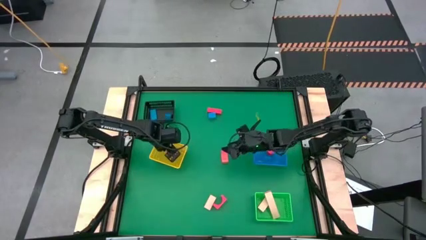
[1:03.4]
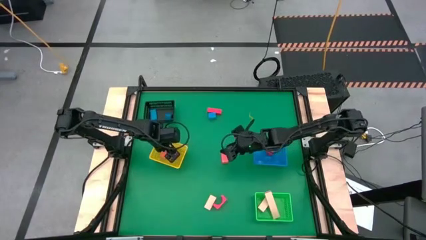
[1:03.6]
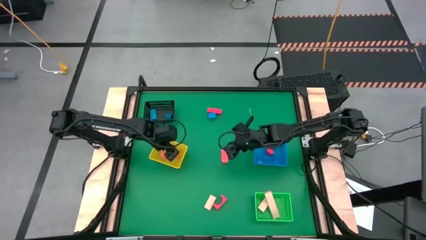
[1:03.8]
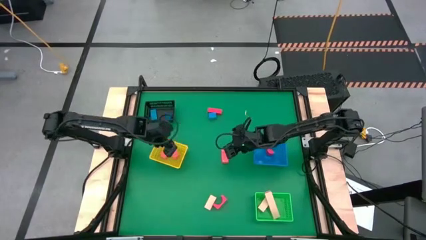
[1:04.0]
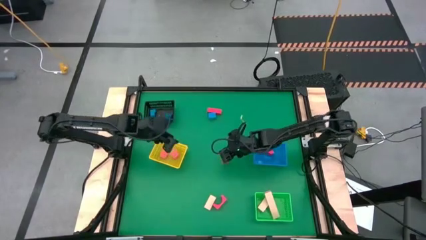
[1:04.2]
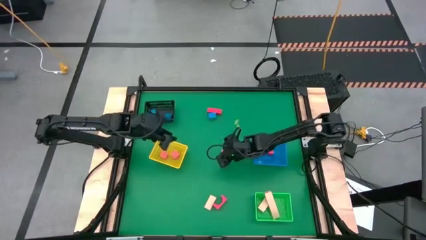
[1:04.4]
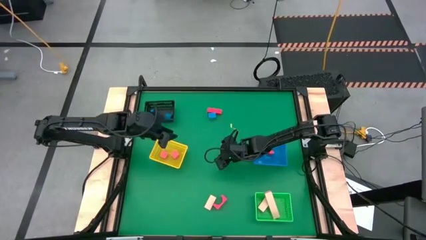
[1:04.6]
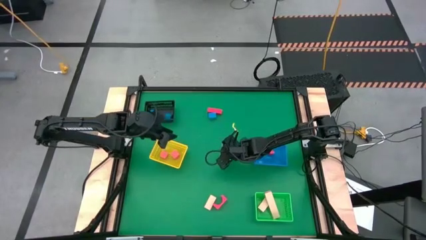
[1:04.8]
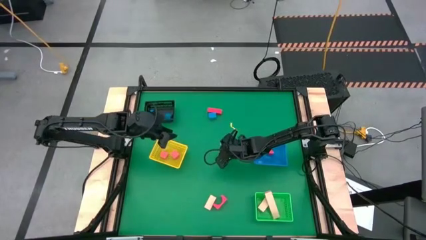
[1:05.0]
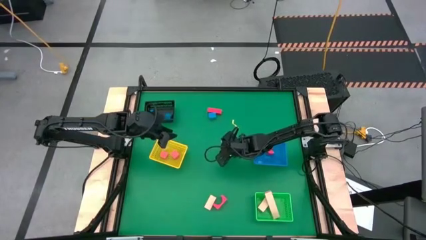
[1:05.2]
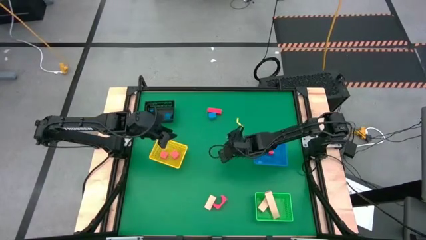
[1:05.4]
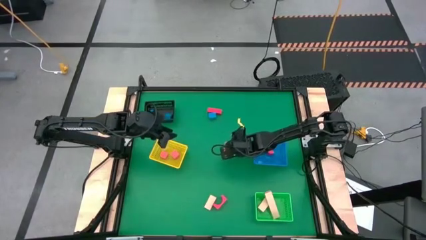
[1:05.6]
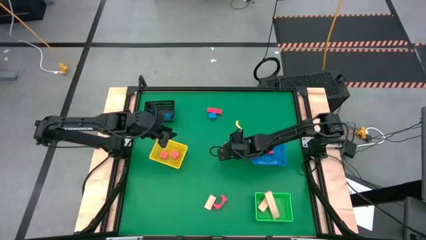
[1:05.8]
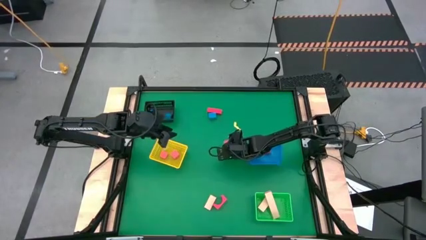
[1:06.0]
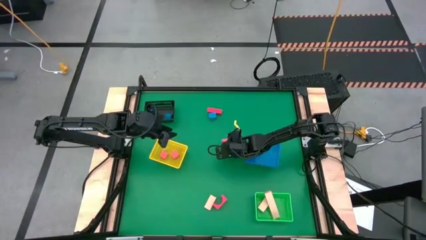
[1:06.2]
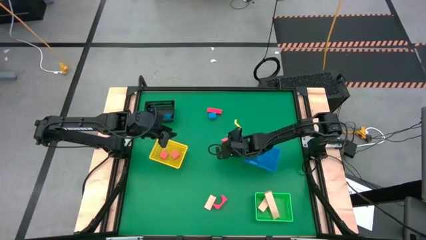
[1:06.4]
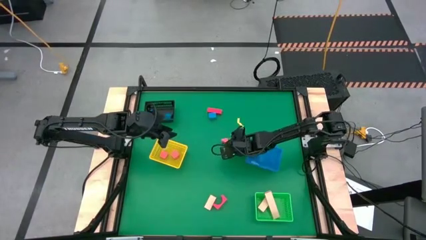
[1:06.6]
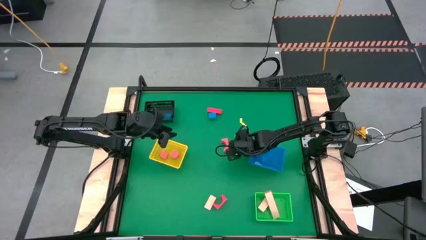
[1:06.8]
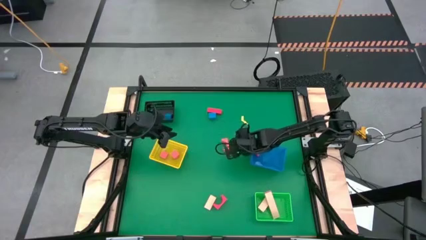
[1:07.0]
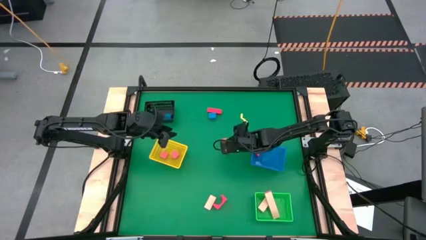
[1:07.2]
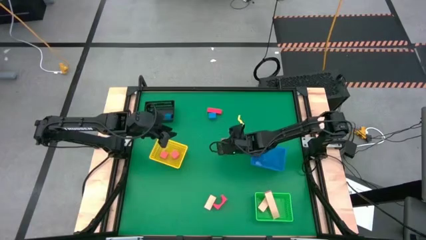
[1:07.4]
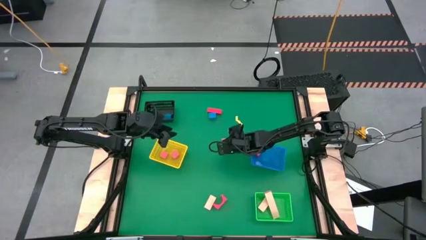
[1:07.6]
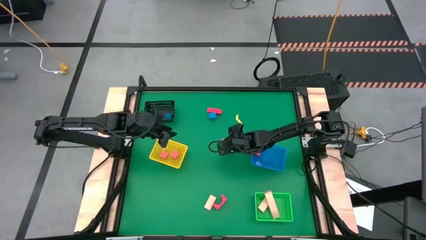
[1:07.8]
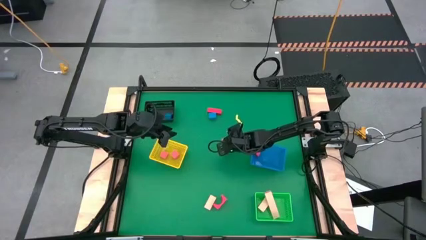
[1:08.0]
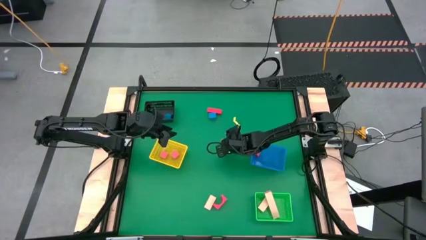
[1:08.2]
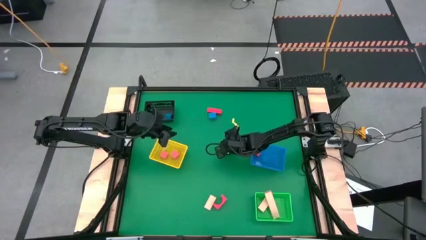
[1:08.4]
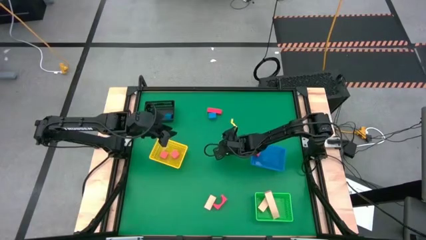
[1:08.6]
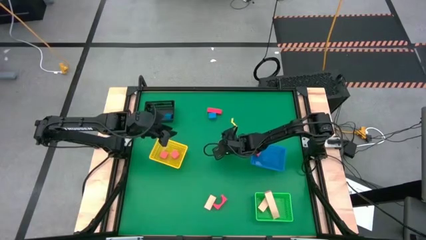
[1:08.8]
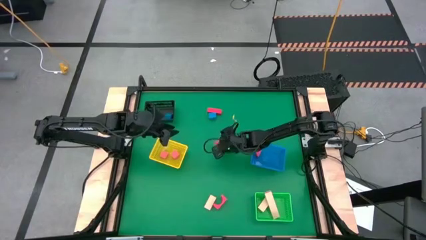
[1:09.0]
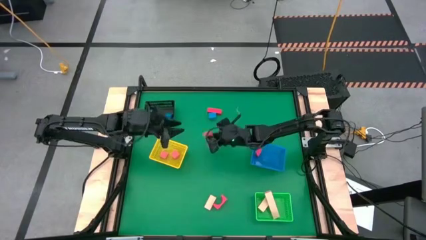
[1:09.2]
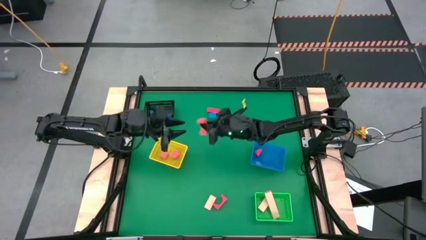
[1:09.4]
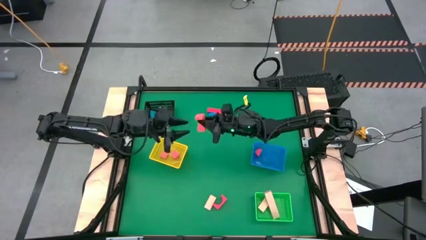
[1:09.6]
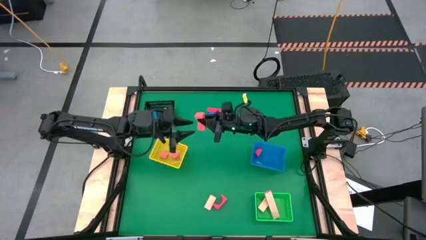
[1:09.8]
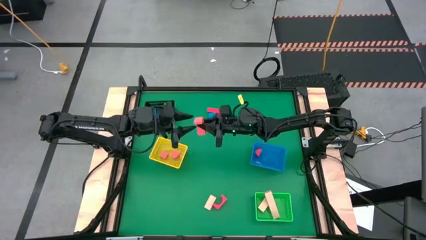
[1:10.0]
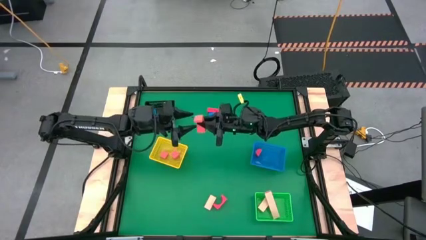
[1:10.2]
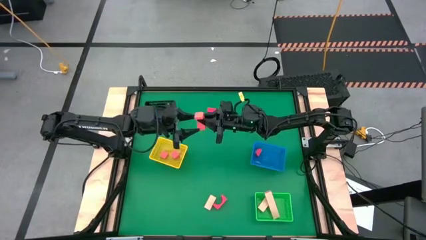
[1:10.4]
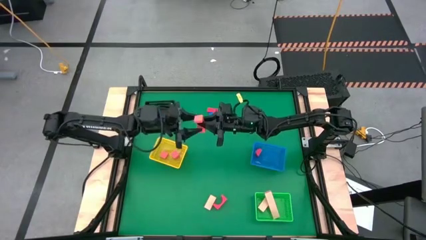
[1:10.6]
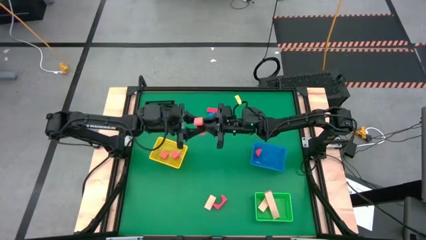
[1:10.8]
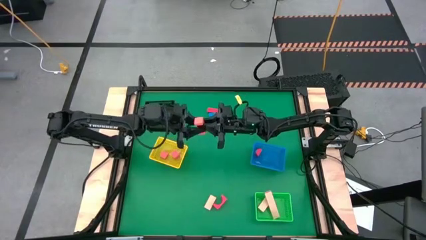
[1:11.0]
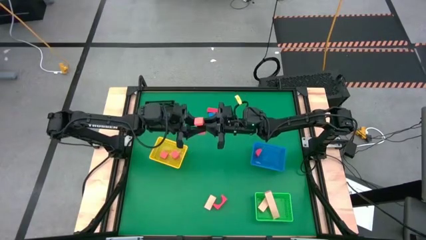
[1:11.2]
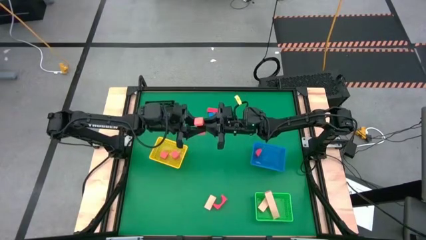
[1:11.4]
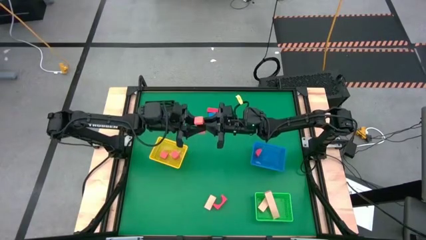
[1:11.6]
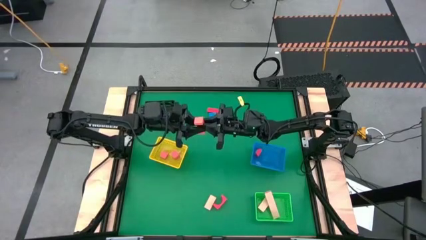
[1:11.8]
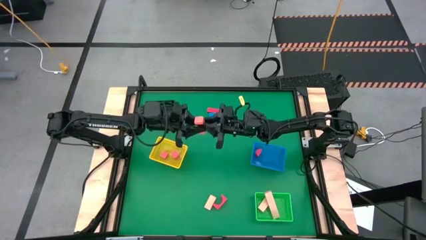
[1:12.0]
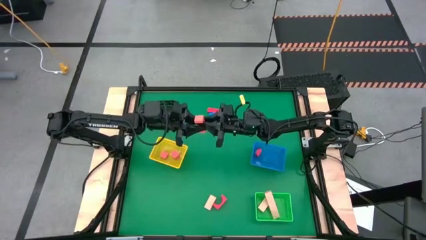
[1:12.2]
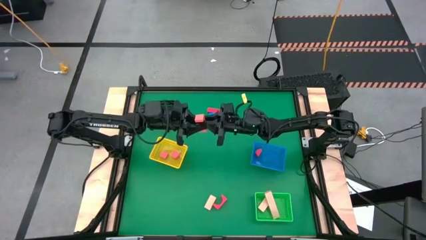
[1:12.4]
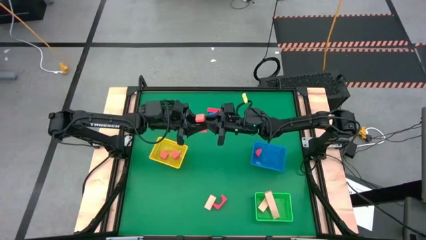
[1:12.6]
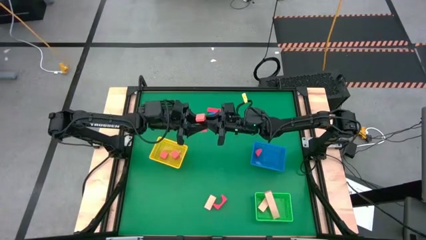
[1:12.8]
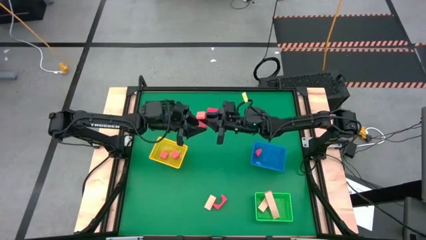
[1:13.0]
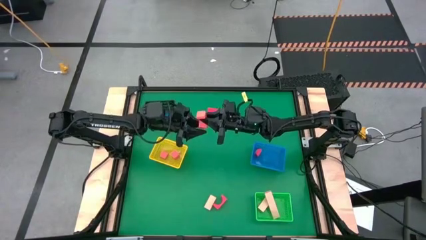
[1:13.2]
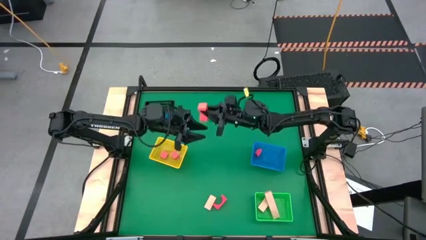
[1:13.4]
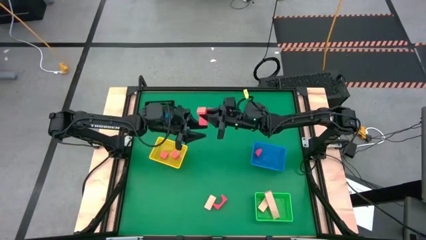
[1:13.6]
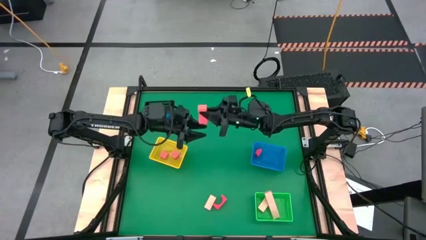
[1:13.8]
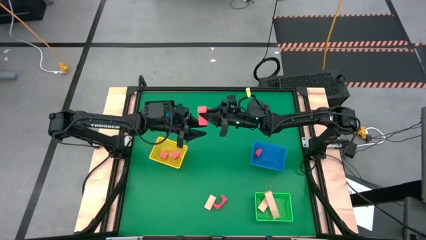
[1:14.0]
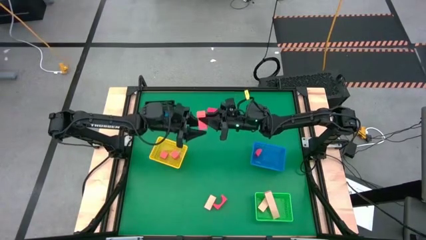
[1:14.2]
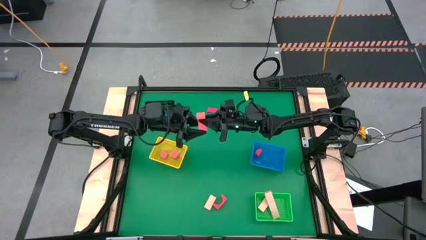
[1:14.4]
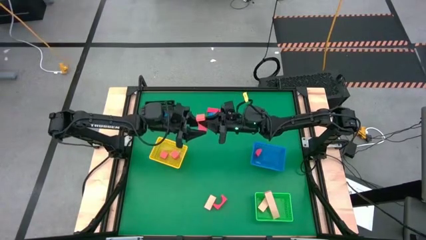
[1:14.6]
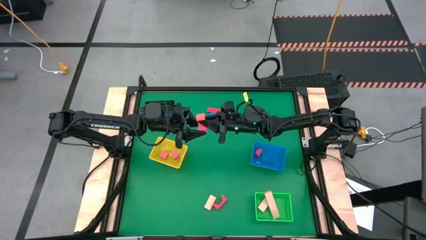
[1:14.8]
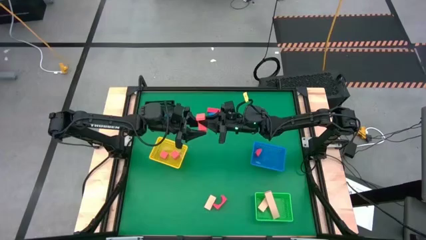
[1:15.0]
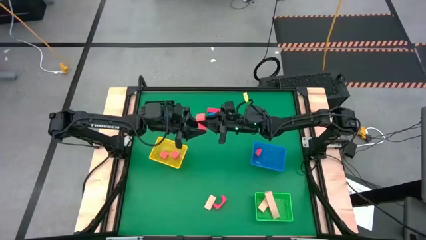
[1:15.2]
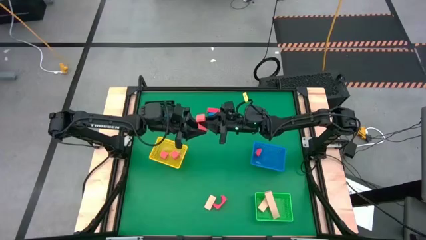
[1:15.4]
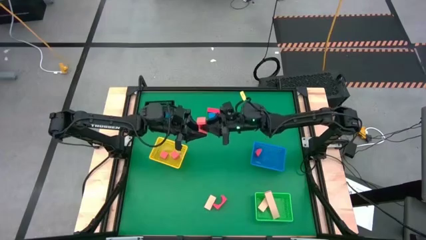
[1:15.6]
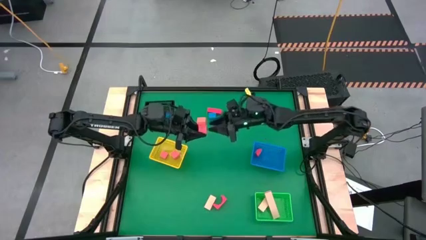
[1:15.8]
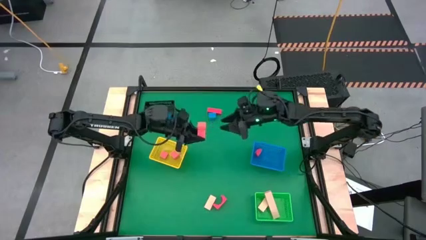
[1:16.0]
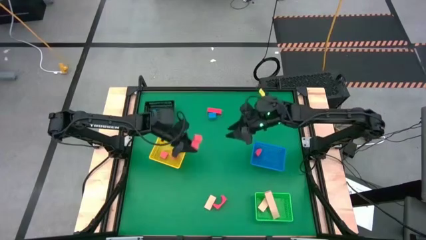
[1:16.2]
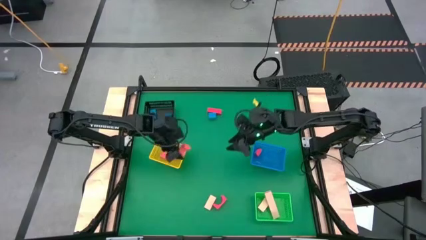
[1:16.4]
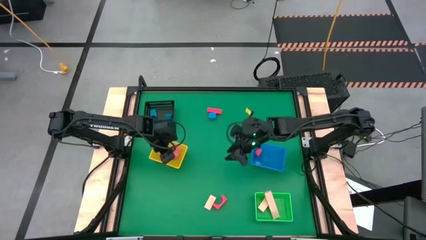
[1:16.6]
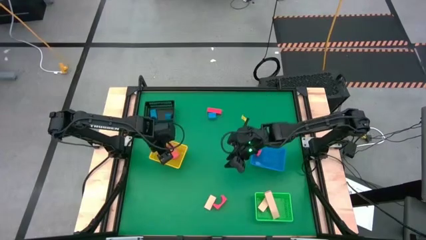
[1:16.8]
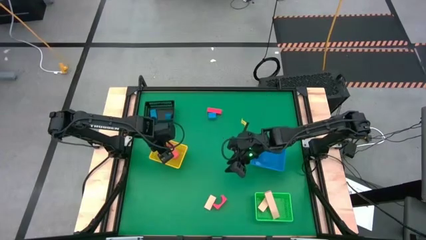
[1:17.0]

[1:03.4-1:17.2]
Task: Sort & place blocks by color
Put the pink arch block into the yellow basket

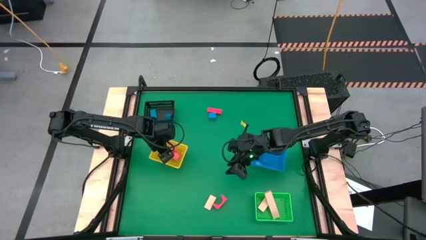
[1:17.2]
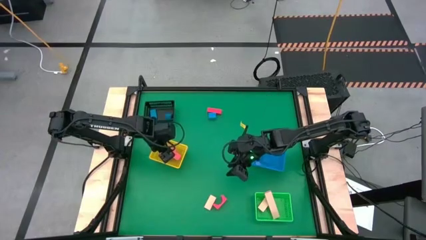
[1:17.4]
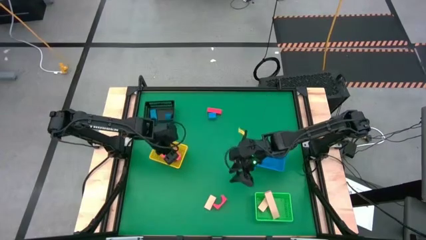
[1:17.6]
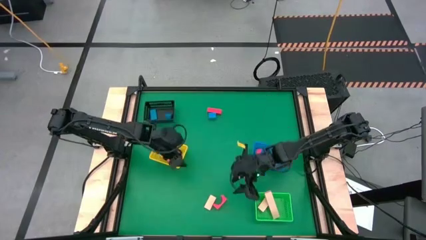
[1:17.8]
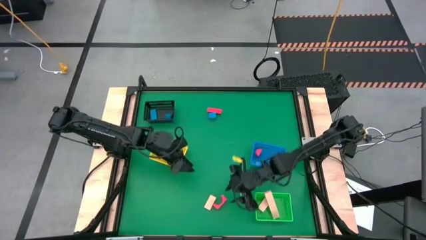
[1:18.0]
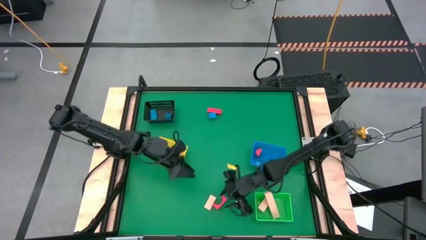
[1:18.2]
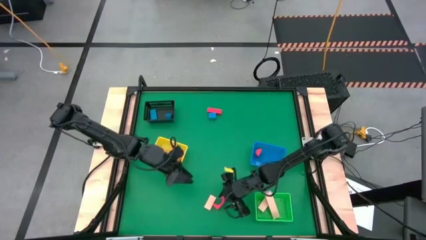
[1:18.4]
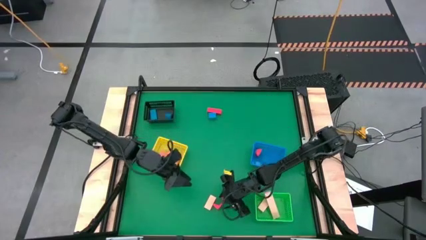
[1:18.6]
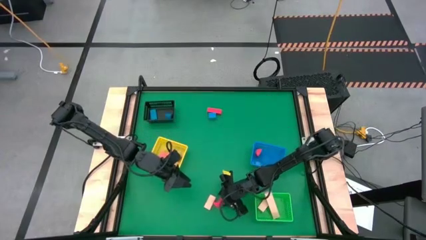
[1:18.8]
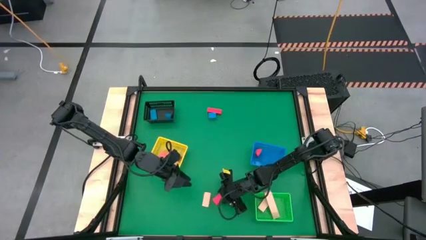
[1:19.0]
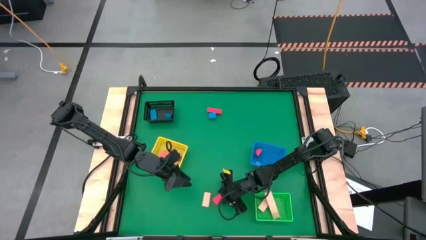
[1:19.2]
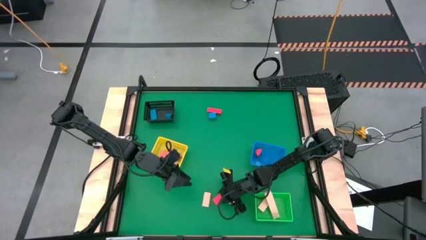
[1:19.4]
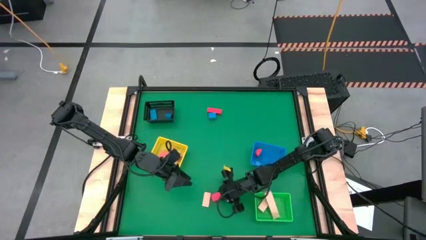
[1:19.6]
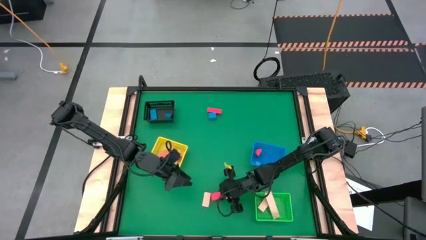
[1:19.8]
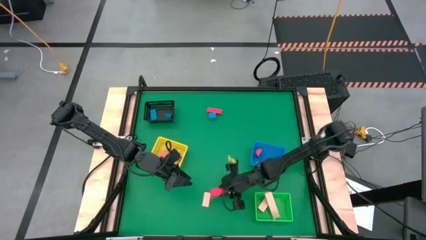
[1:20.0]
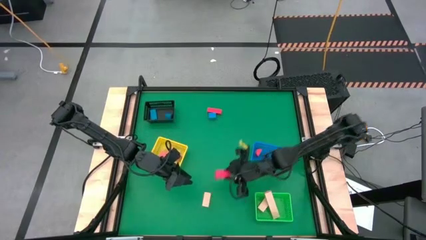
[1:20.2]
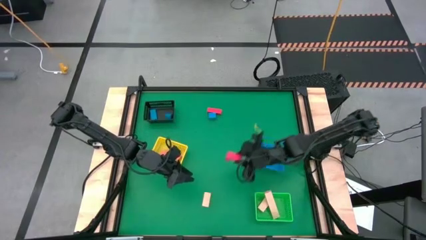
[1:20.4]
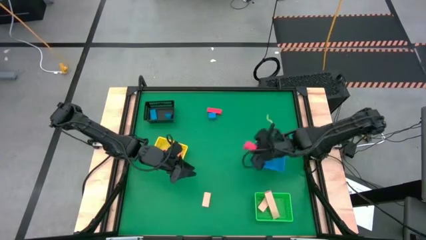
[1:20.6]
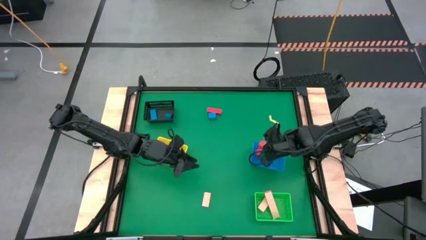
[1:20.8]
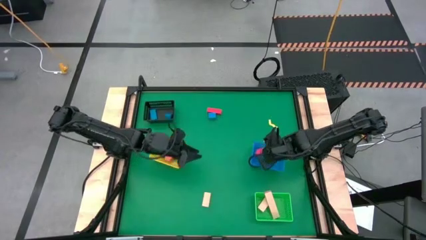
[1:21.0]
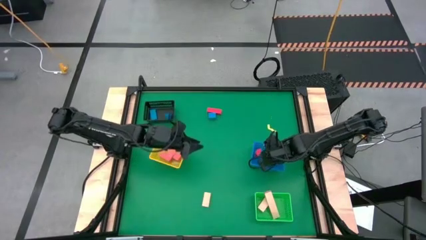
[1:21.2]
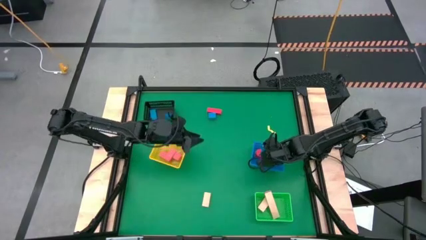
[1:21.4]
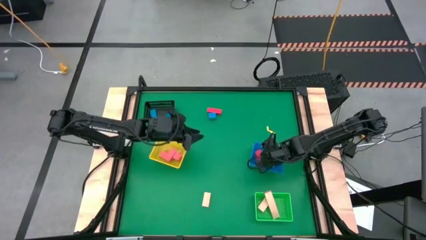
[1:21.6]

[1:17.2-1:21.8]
Put the red arch block into the blue basket
